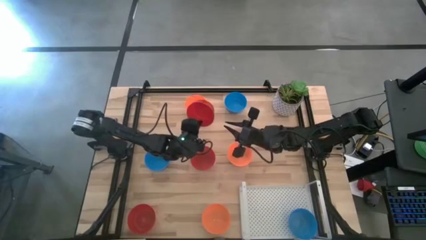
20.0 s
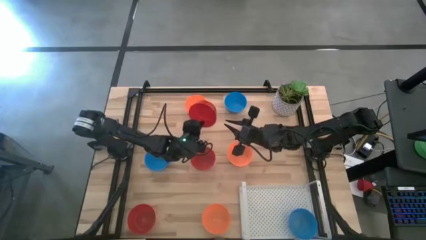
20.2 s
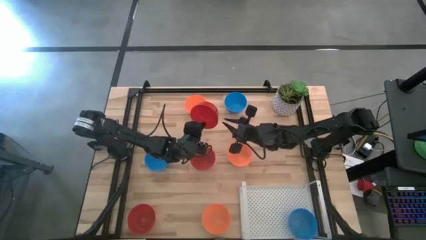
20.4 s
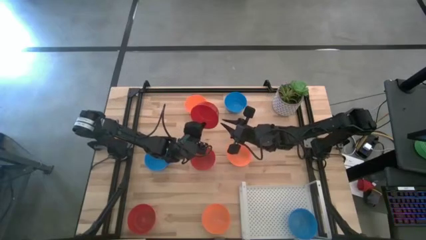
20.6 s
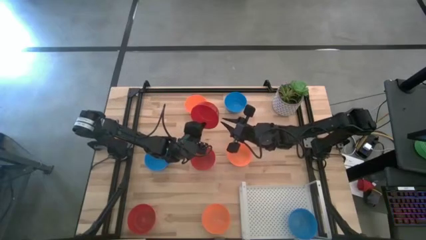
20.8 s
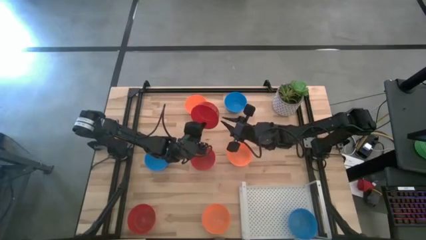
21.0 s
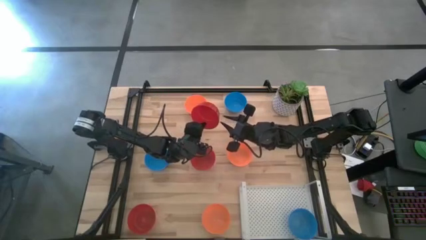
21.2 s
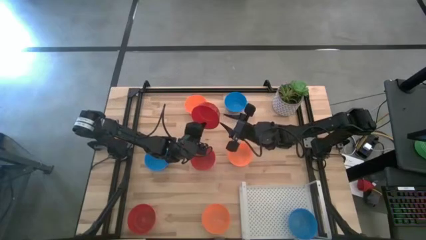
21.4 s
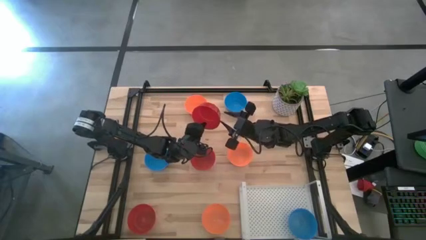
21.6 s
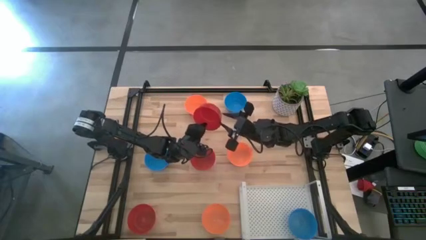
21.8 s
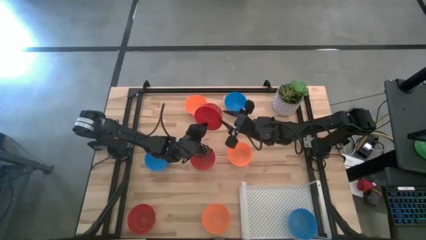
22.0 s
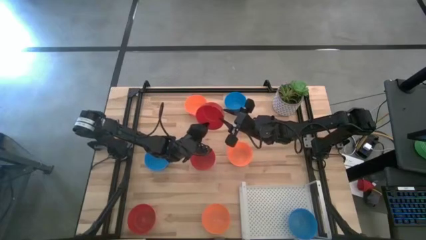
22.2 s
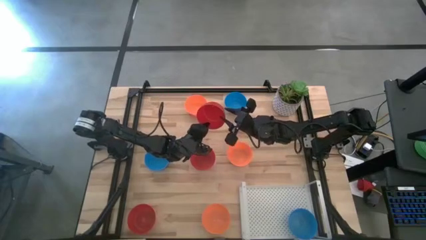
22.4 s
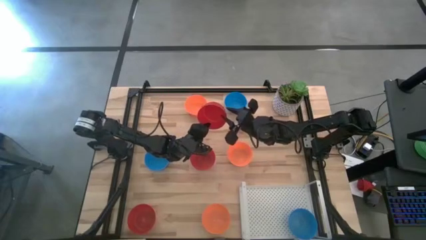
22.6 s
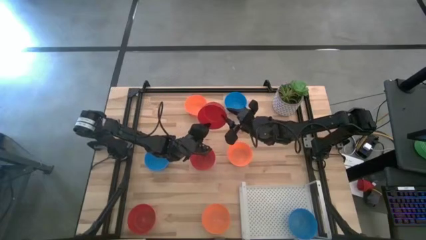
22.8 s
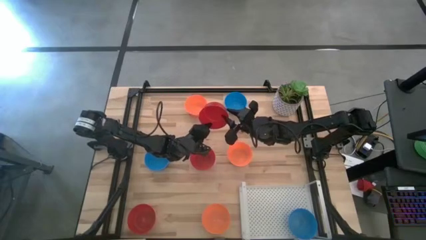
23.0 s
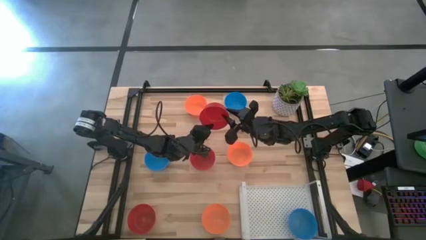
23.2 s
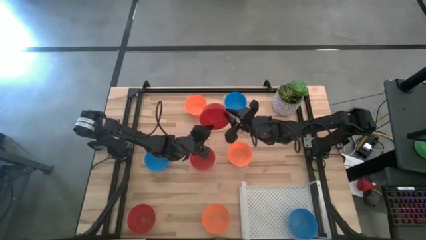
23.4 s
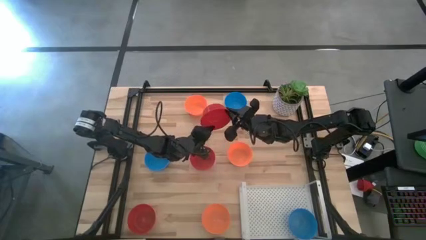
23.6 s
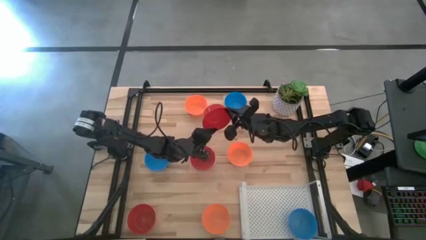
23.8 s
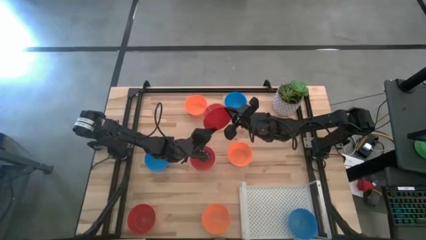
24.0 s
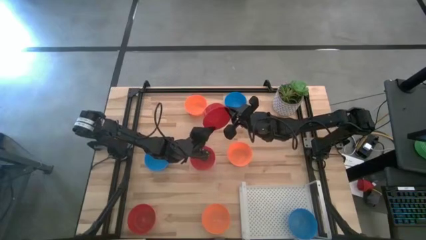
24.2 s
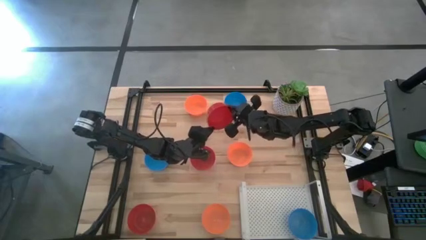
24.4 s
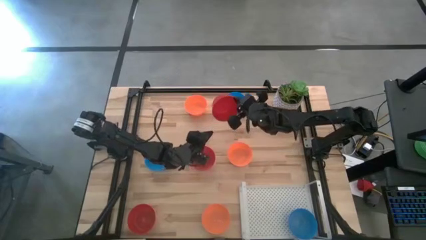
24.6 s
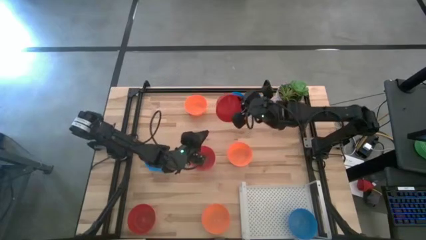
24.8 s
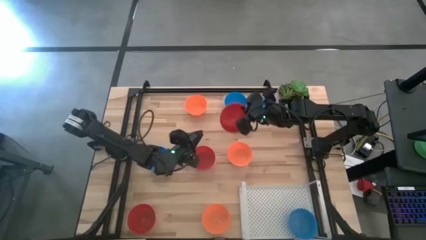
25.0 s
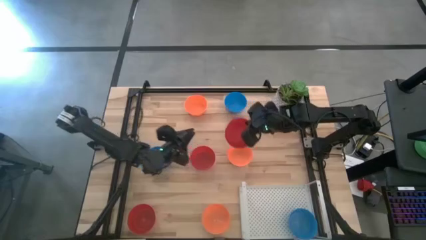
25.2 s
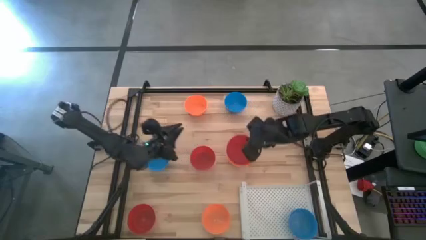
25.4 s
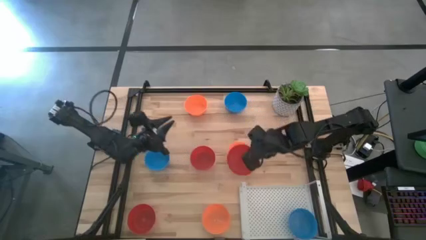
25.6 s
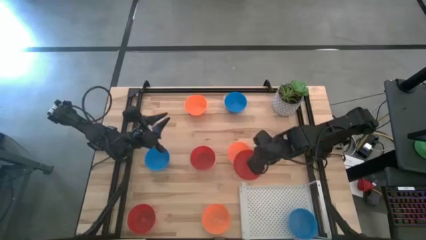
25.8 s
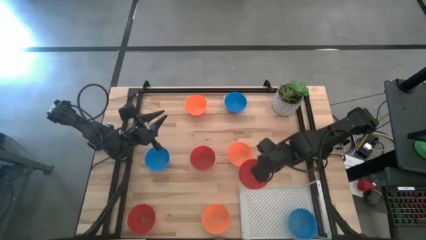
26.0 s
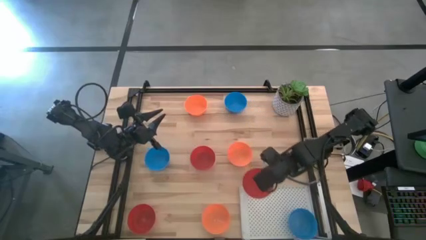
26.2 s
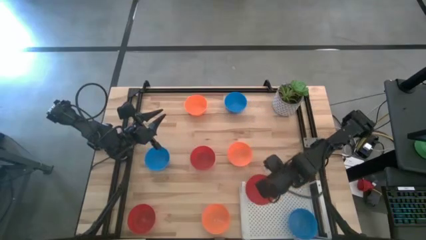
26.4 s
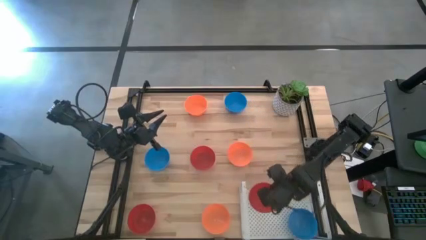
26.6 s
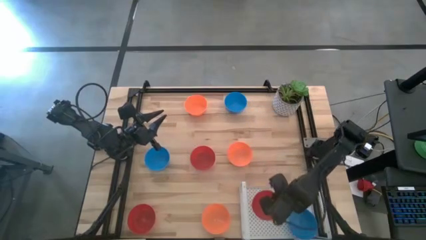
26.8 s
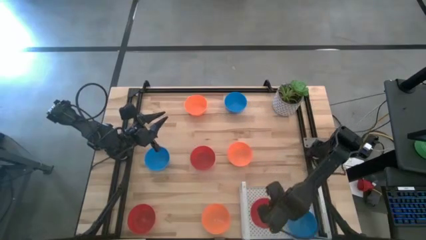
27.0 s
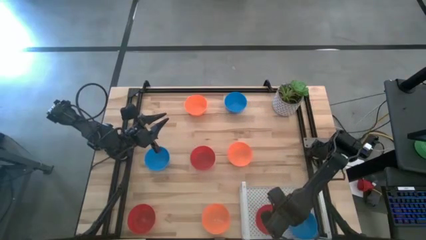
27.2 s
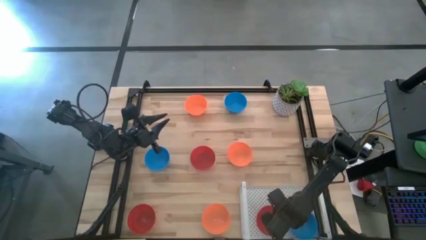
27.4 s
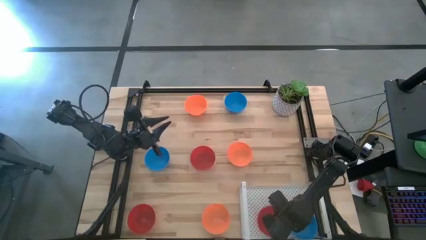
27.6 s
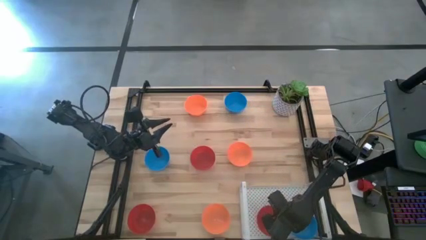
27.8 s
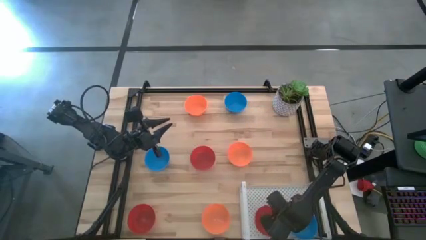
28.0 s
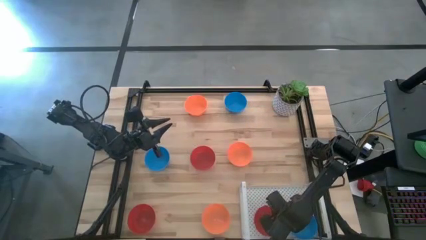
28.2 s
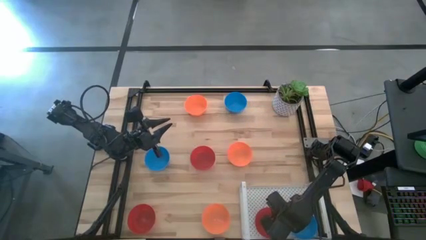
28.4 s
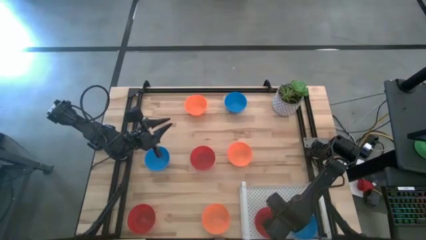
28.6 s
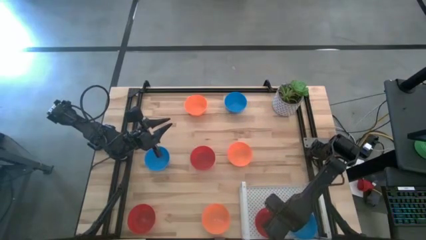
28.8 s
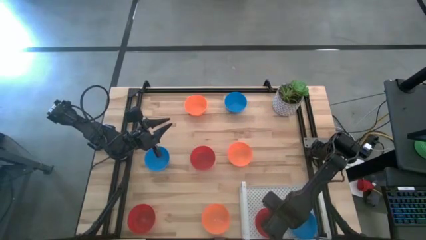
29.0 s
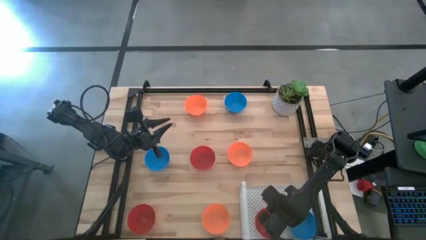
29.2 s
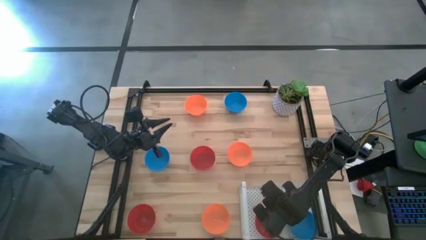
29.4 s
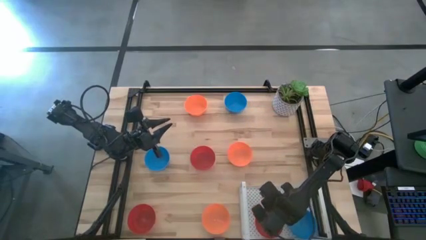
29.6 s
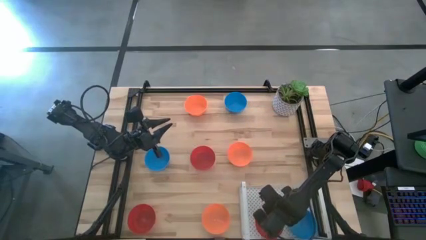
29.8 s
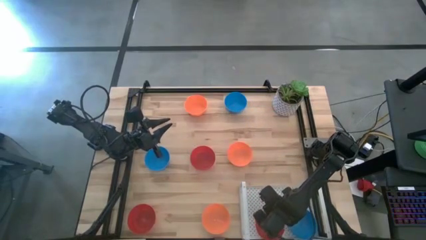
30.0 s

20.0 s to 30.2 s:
Task: Pick & Place Mini bowls
Put the top right red bowl on the shelf
